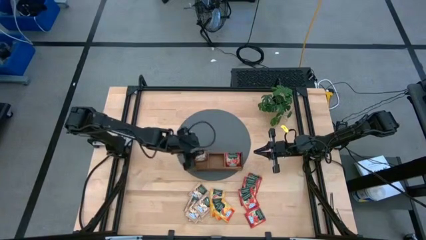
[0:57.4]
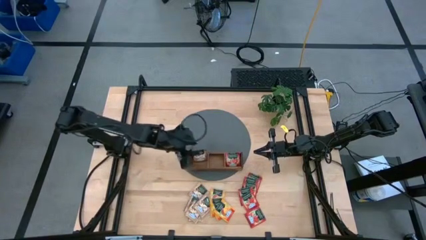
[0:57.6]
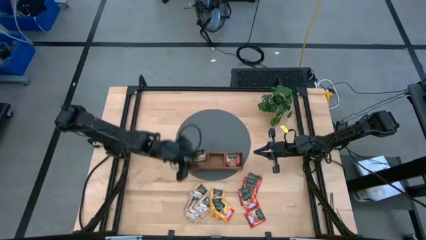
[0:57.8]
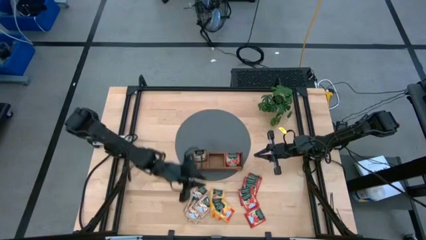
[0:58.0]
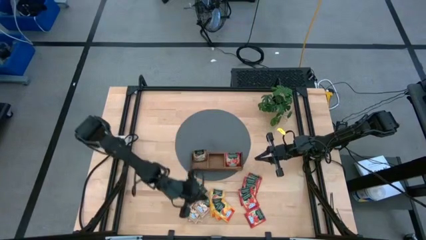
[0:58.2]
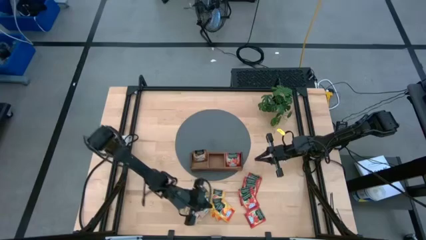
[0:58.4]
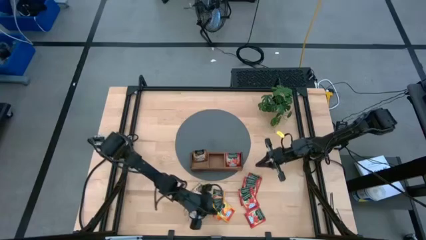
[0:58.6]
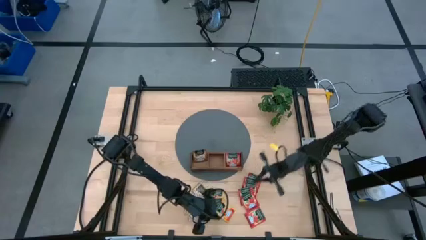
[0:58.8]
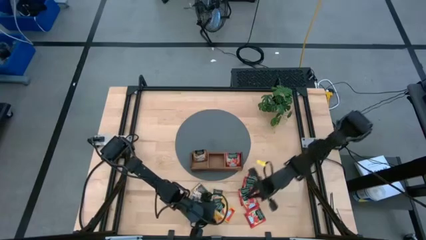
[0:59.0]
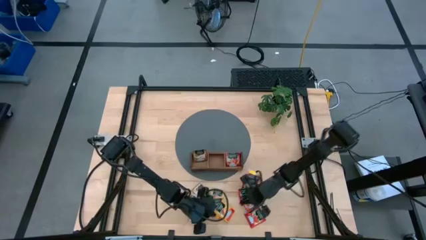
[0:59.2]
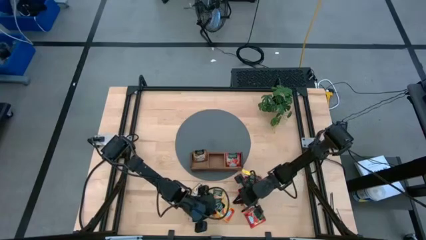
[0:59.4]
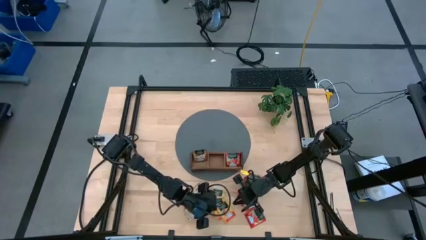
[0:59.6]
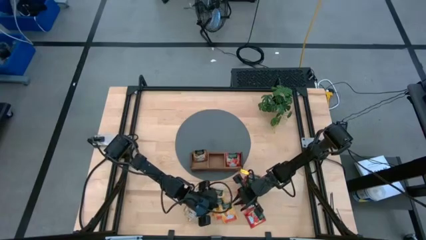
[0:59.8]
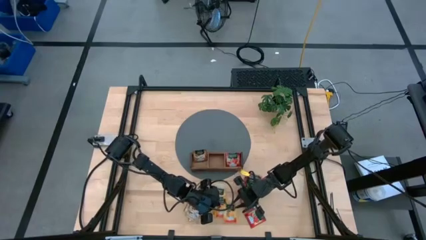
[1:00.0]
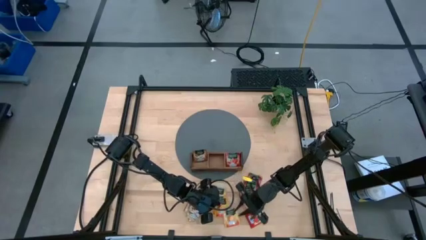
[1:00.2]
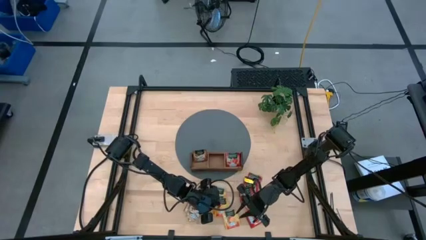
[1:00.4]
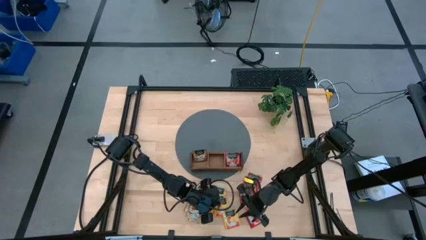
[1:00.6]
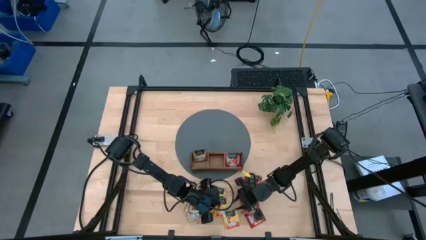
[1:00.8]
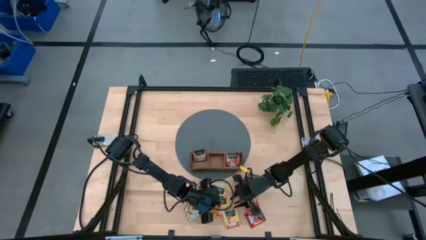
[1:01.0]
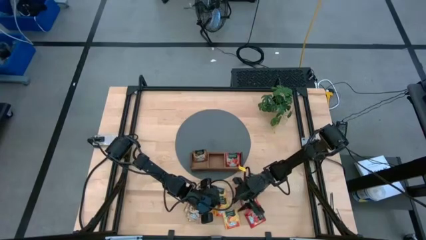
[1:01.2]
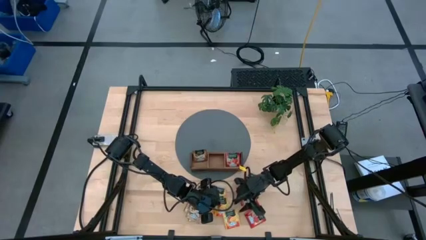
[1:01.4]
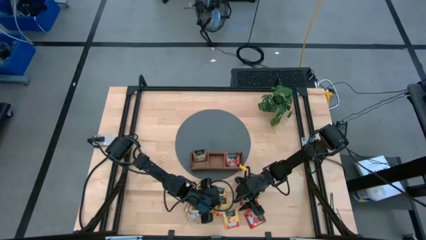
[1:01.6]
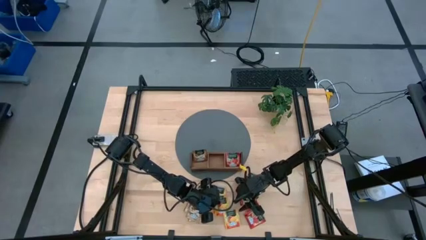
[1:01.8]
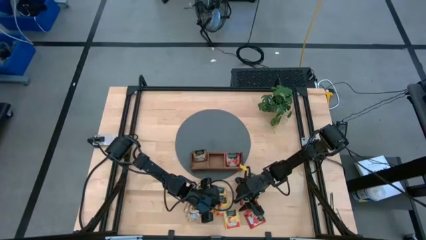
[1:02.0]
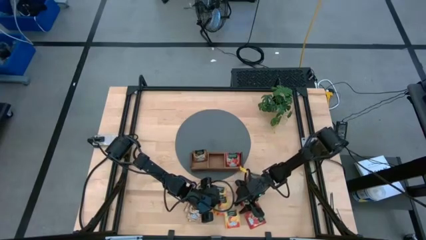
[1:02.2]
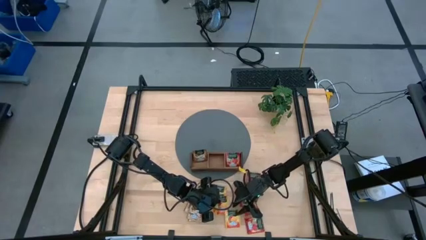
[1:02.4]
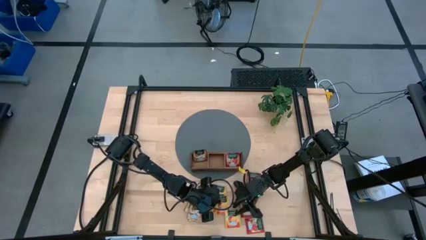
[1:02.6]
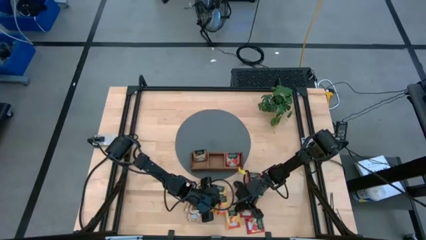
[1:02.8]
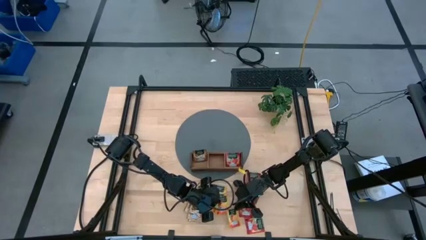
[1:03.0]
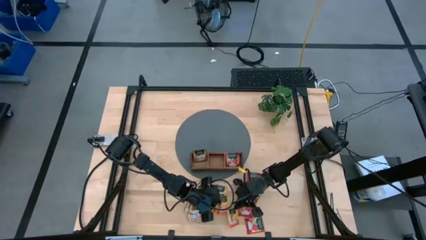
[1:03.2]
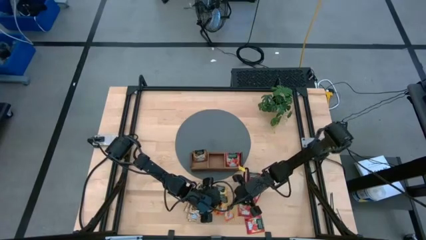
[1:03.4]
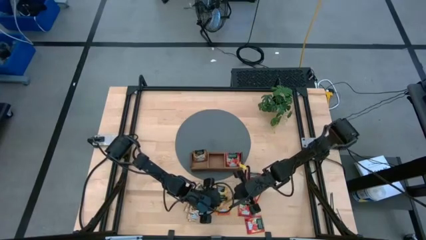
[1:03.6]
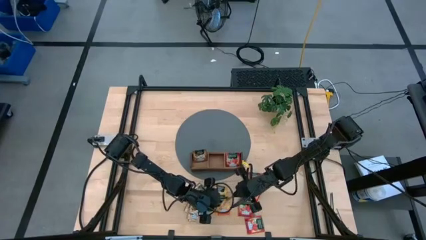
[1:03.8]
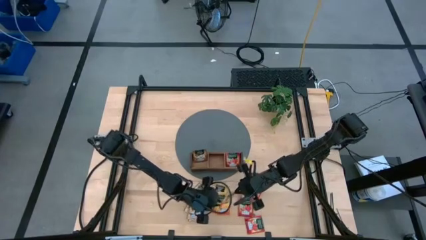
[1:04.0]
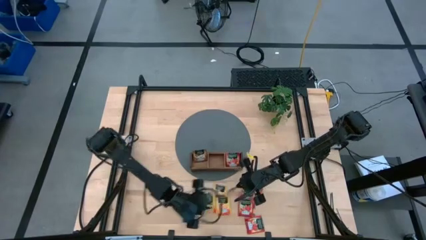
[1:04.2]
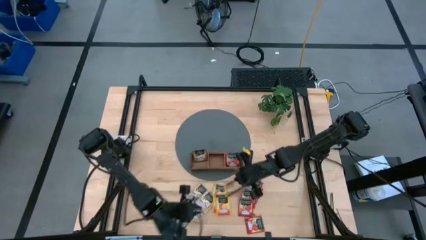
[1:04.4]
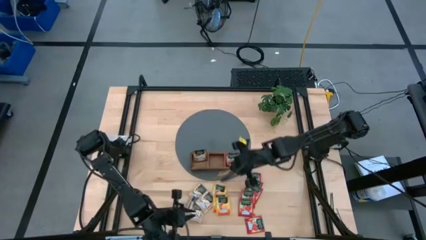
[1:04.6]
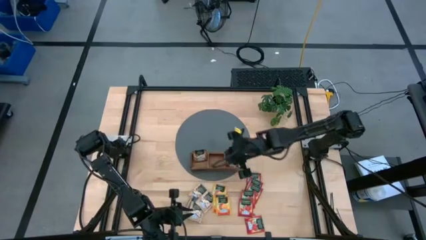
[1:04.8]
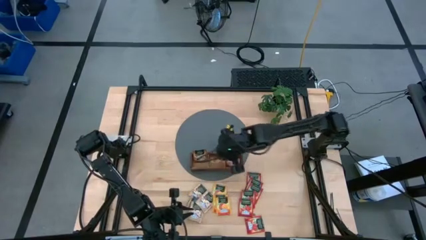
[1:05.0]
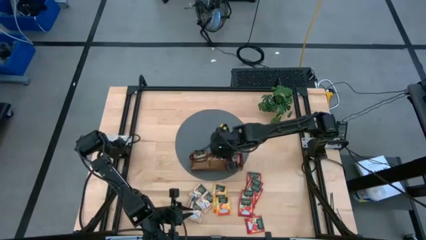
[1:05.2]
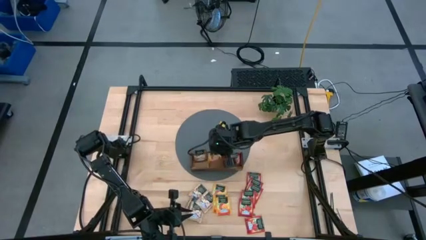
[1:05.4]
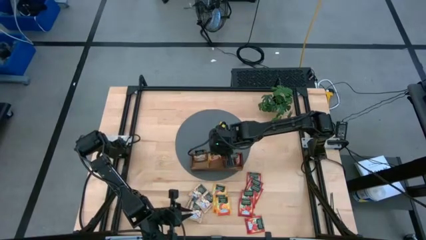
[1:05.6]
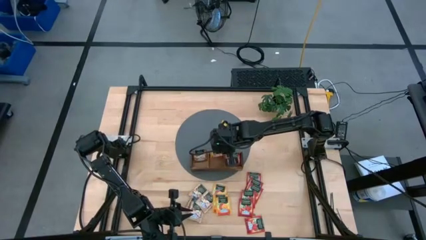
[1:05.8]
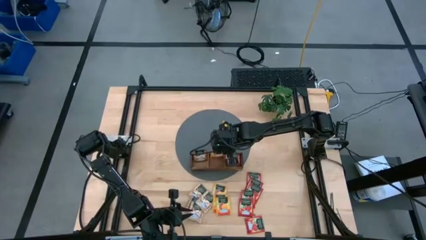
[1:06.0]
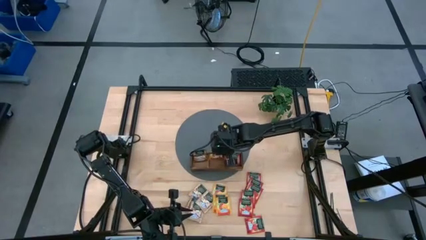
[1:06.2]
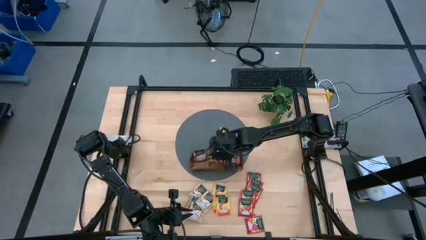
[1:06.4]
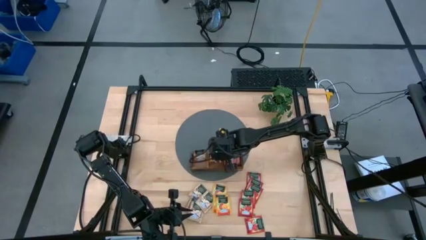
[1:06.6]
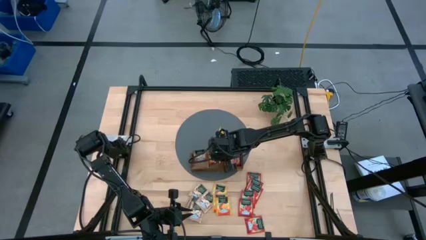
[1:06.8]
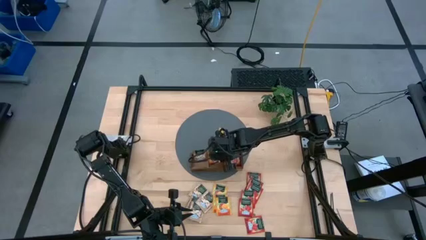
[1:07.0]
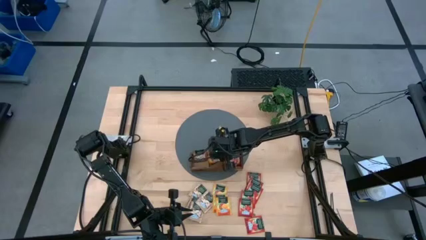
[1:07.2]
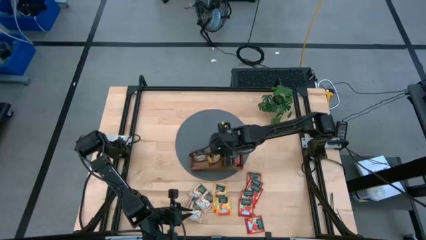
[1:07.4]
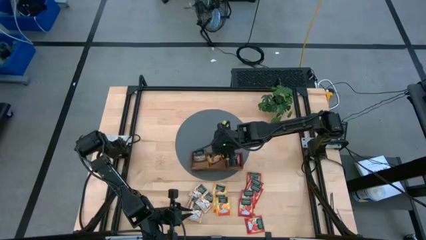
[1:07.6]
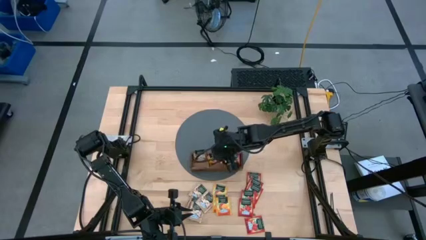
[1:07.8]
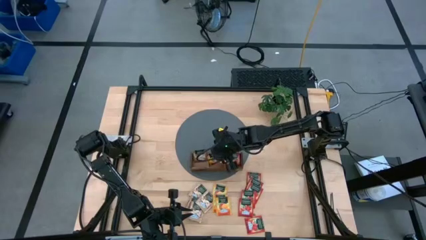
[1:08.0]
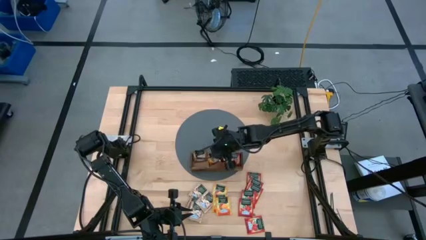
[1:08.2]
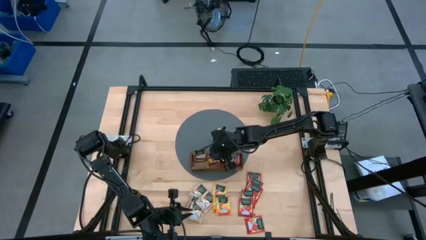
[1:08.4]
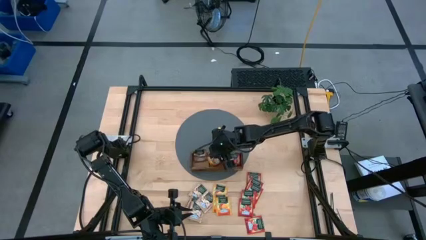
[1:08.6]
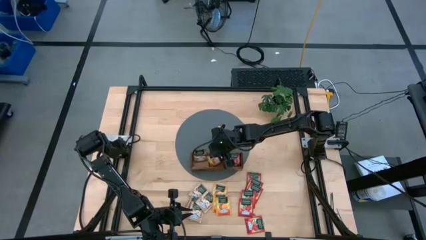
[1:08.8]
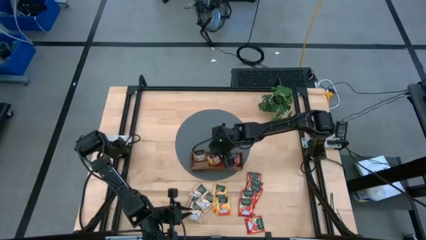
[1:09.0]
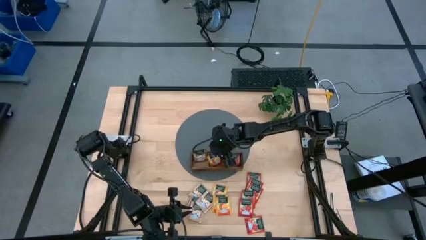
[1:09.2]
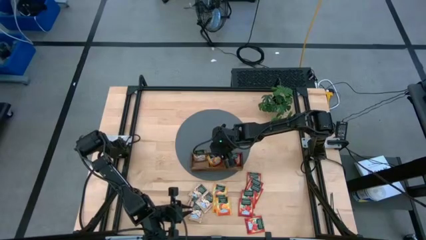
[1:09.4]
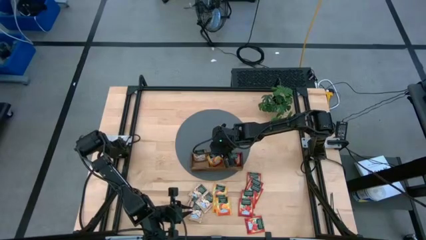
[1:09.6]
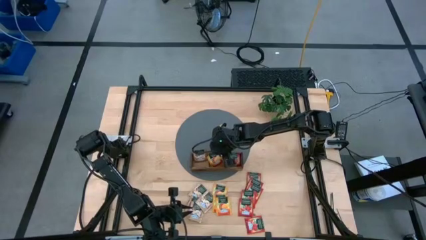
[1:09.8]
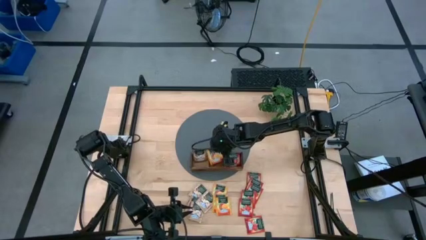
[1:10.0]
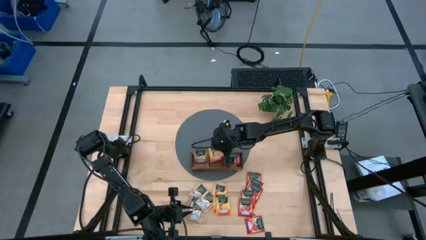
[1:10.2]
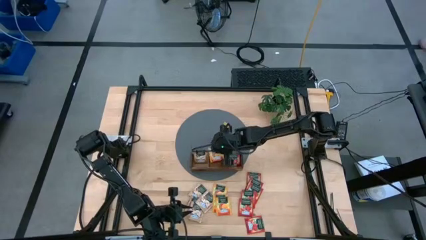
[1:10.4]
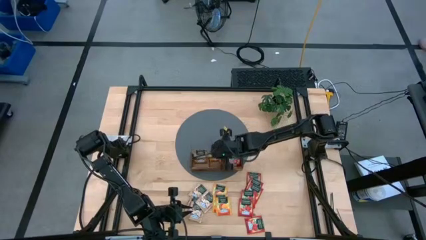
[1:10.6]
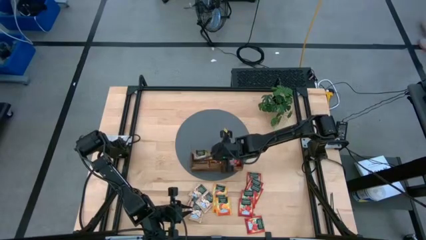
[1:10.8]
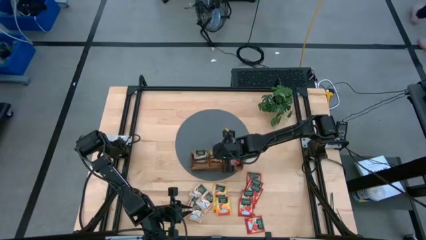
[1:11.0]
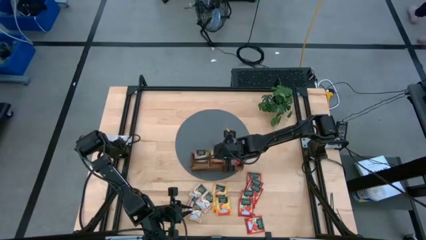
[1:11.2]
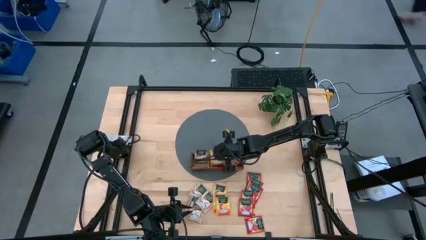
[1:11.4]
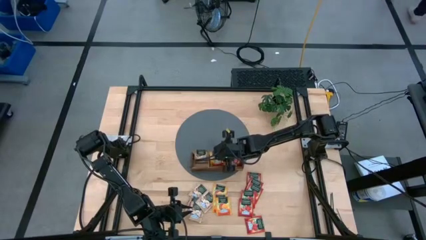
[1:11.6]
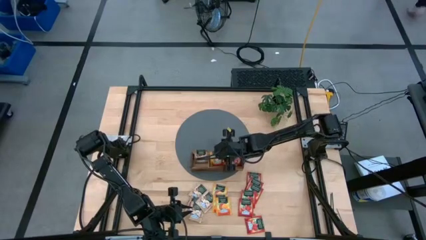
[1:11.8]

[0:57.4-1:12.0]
Task: Pick & Place Tea
Put the yellow tea bag into the middle section of the wooden organizer

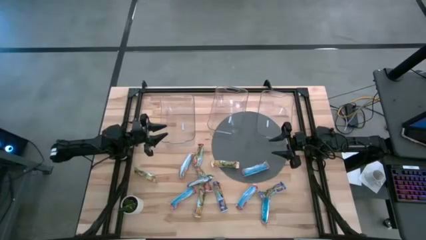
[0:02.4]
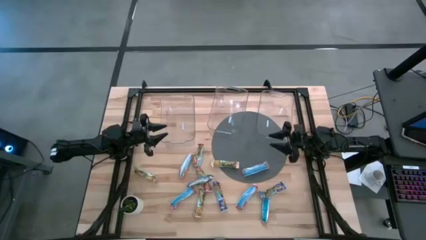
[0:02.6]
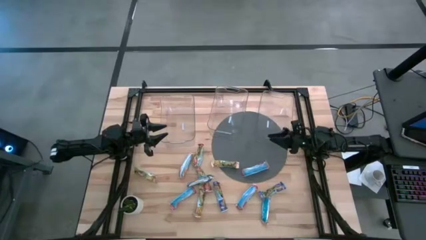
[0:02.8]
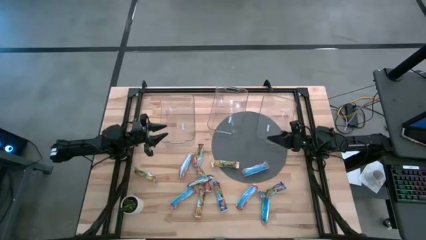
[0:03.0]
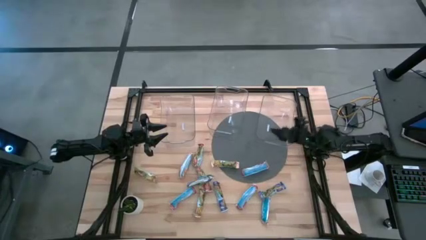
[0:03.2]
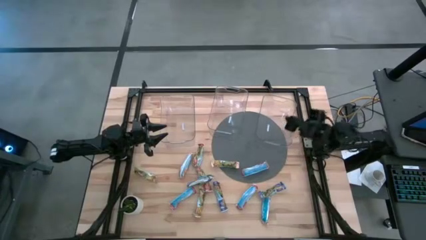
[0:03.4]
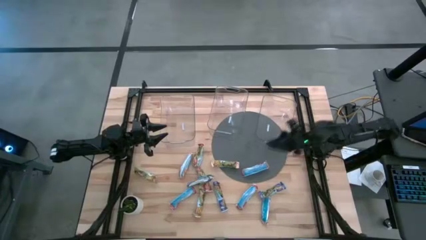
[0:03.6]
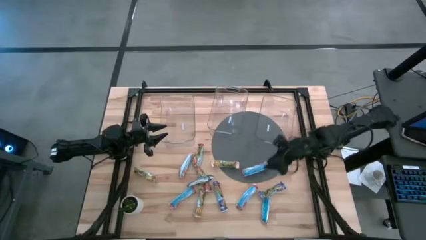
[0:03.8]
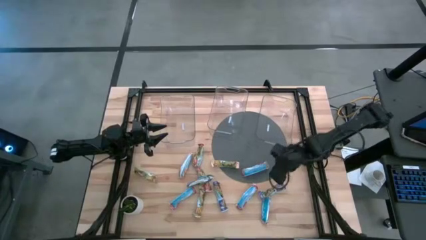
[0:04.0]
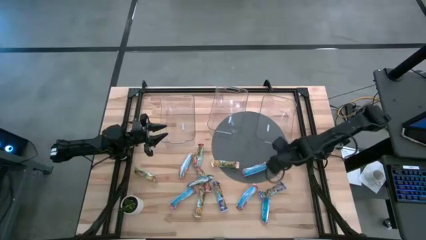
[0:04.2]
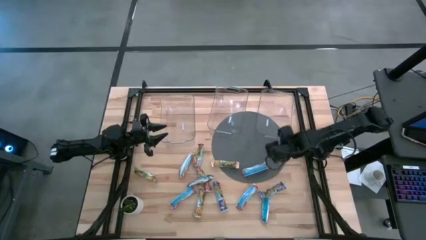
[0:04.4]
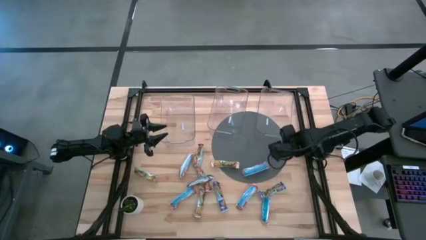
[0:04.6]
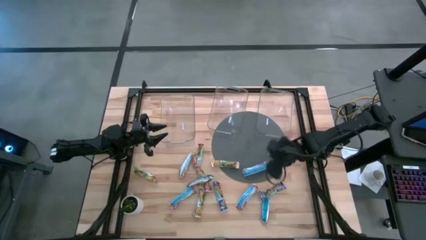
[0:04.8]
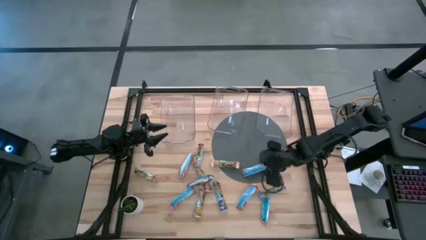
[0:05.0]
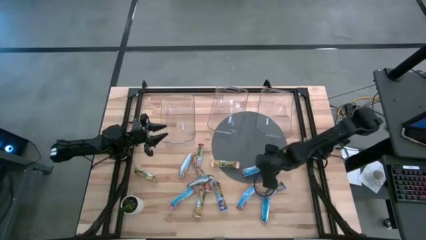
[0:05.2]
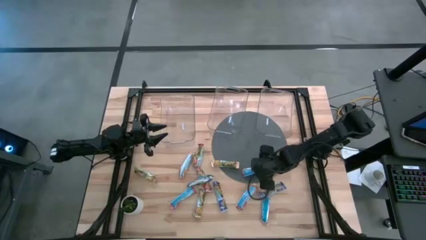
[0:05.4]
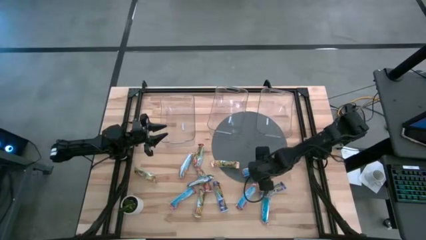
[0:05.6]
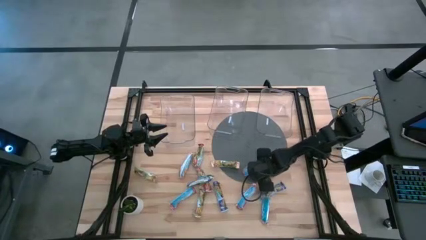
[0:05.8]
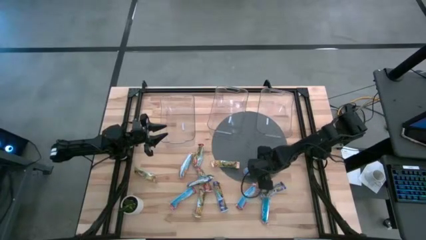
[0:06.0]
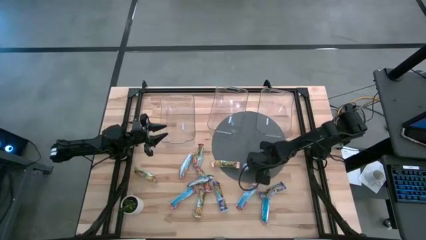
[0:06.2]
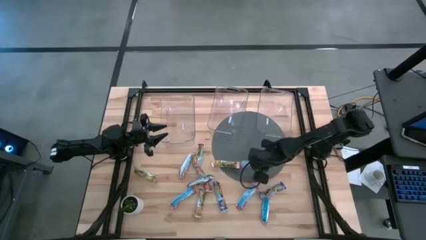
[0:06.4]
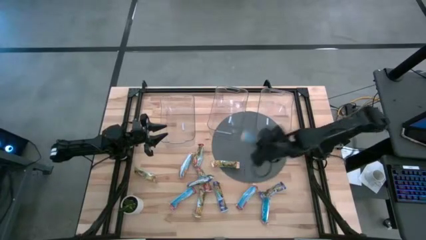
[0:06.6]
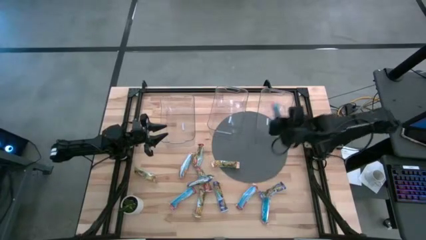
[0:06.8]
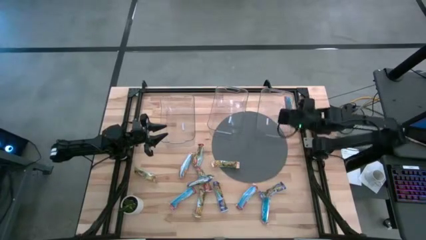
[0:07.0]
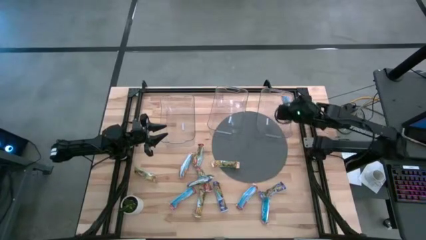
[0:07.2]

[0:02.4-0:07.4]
Task: Pick and place Granola Bars by type
Put the red granola bar into the right transparent bin
